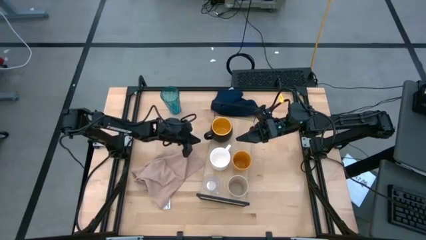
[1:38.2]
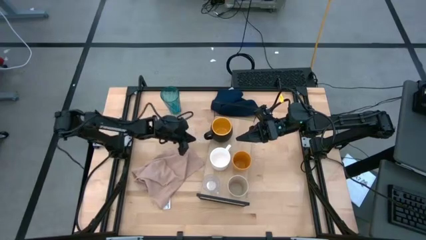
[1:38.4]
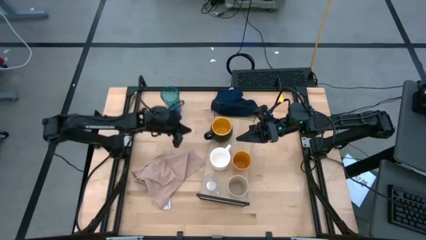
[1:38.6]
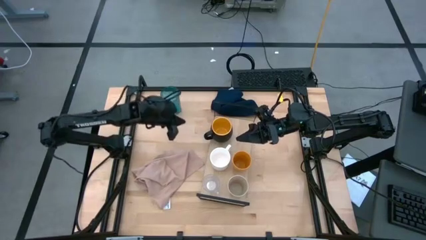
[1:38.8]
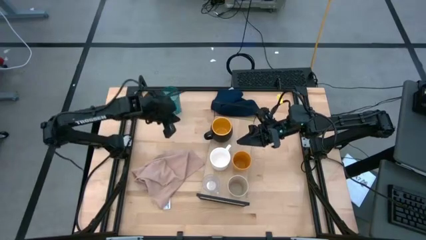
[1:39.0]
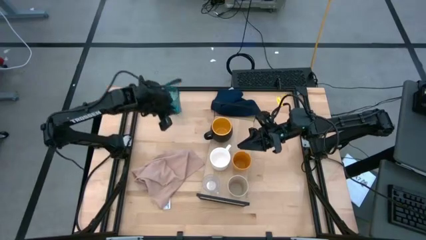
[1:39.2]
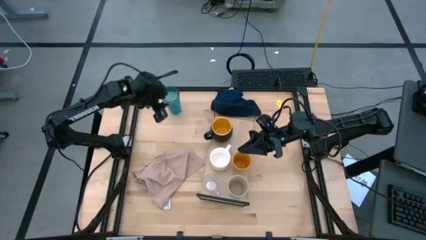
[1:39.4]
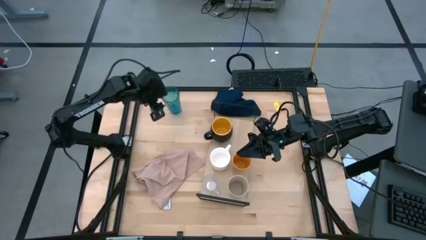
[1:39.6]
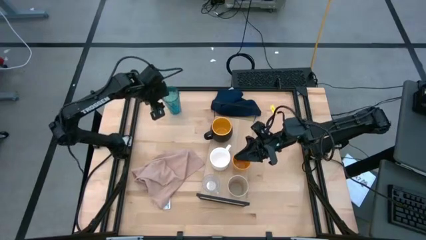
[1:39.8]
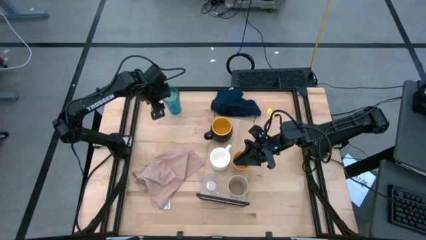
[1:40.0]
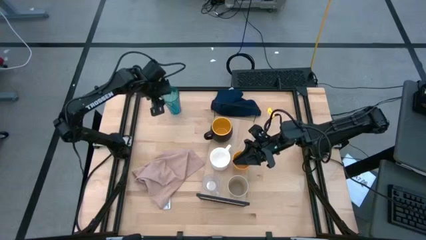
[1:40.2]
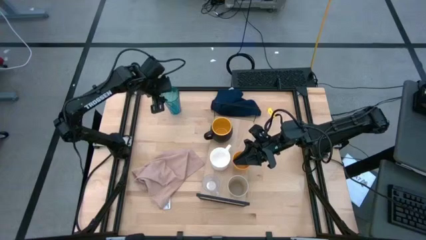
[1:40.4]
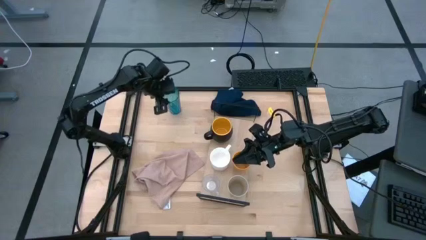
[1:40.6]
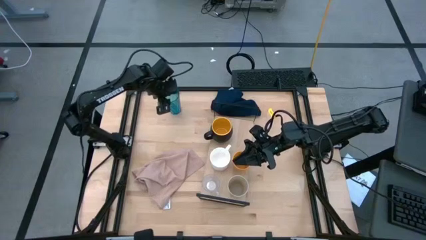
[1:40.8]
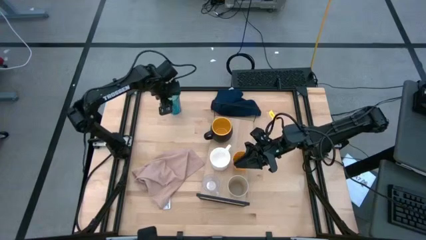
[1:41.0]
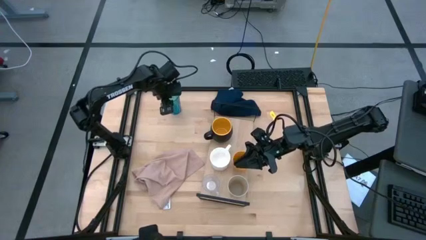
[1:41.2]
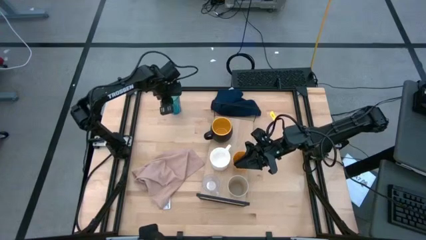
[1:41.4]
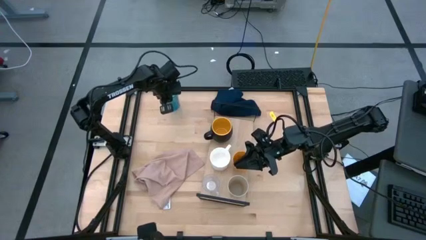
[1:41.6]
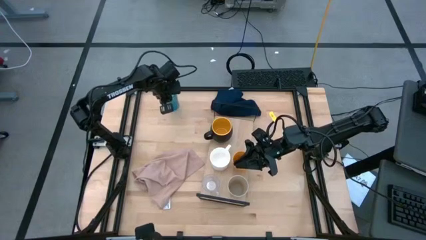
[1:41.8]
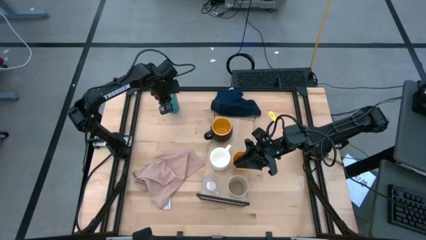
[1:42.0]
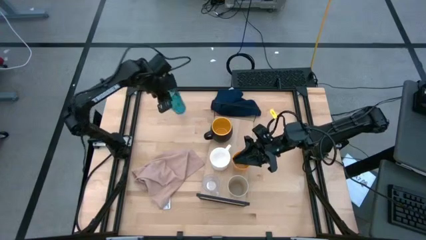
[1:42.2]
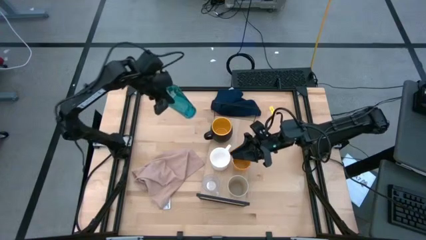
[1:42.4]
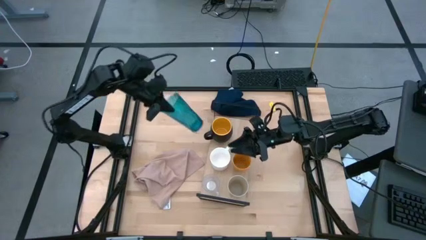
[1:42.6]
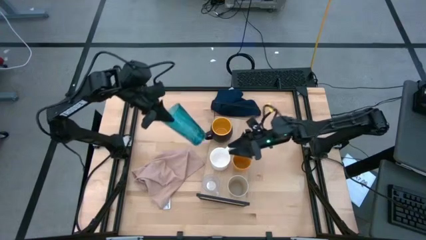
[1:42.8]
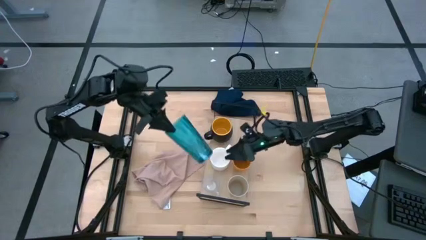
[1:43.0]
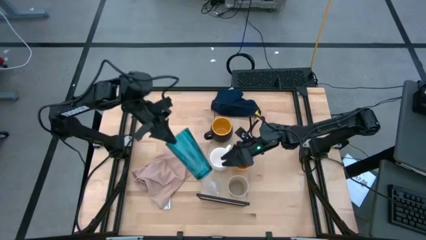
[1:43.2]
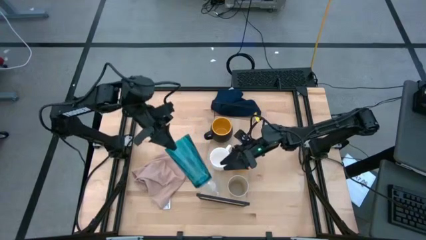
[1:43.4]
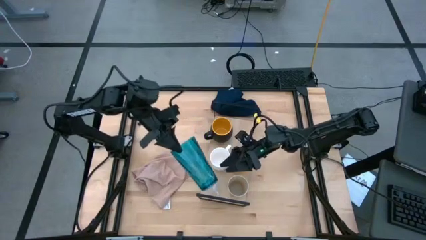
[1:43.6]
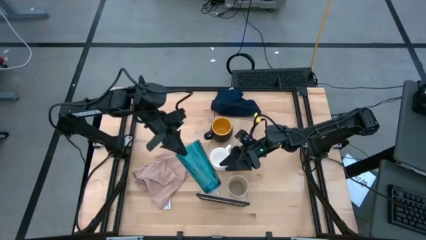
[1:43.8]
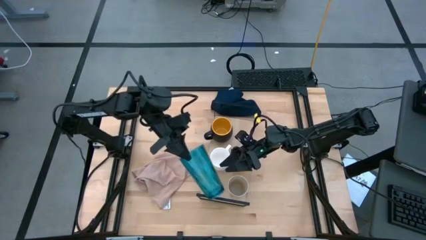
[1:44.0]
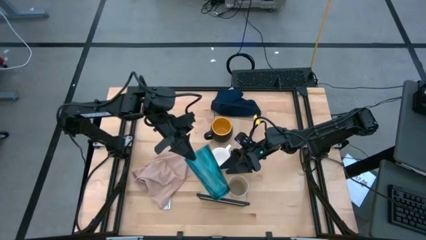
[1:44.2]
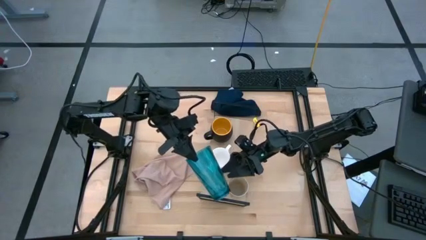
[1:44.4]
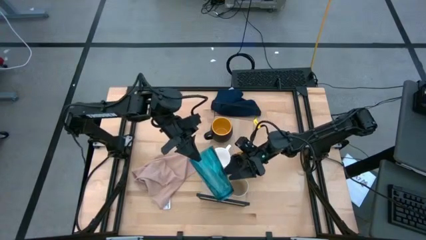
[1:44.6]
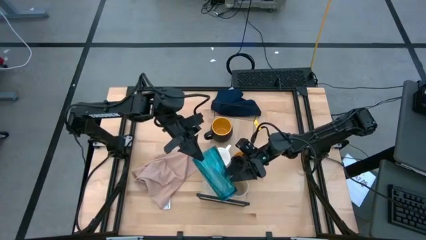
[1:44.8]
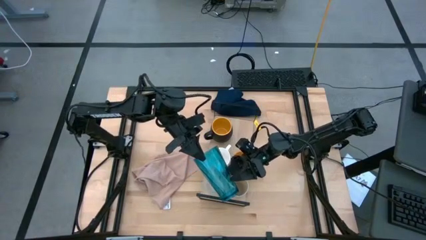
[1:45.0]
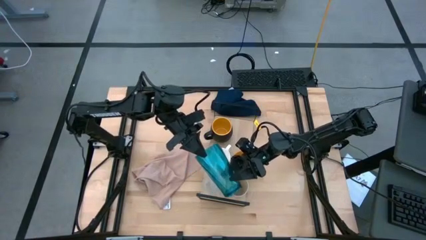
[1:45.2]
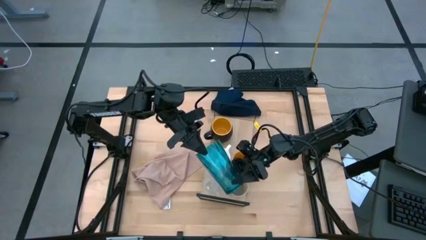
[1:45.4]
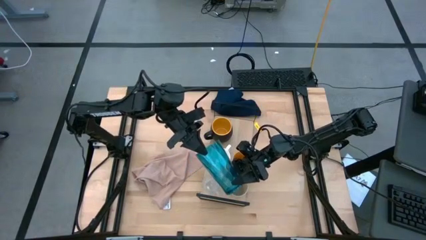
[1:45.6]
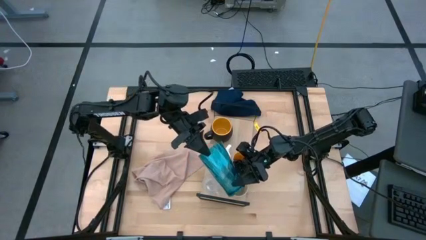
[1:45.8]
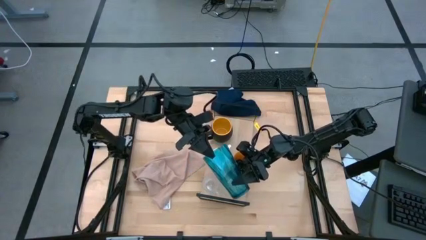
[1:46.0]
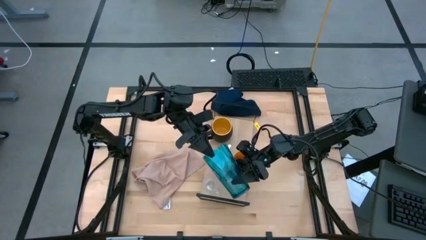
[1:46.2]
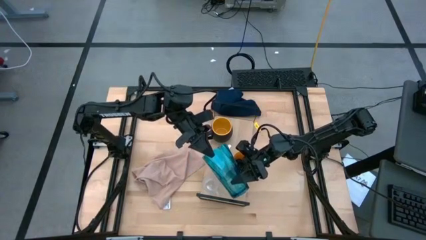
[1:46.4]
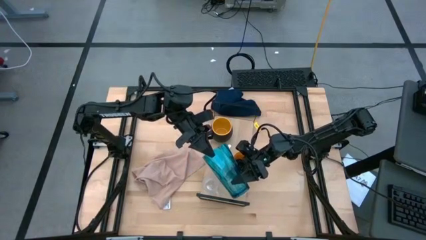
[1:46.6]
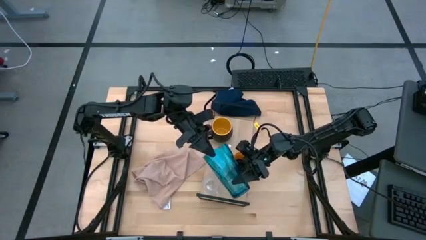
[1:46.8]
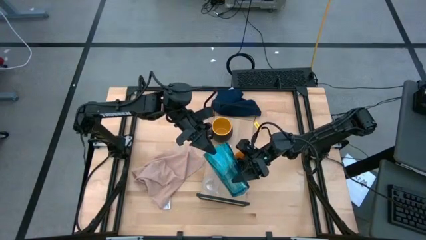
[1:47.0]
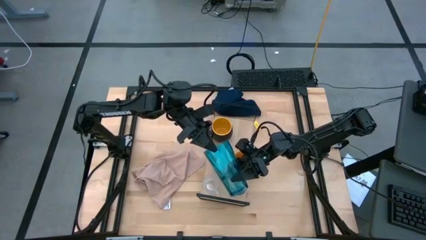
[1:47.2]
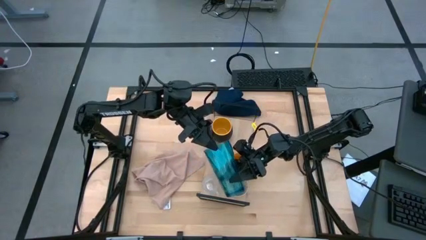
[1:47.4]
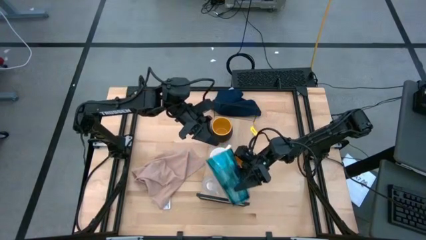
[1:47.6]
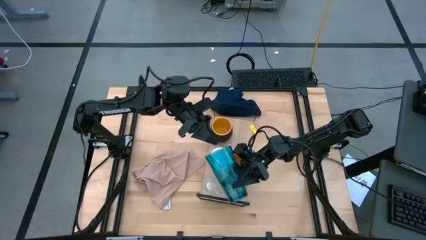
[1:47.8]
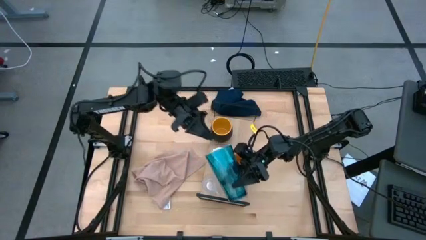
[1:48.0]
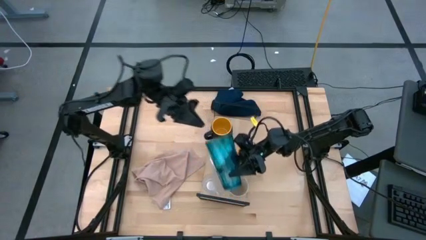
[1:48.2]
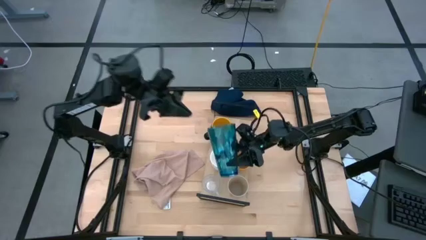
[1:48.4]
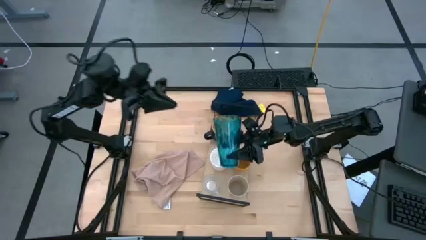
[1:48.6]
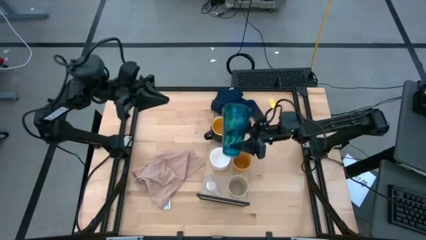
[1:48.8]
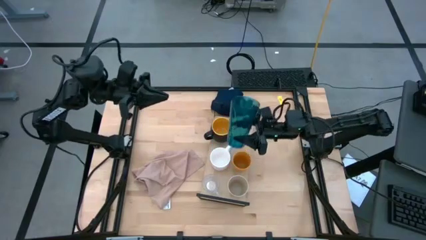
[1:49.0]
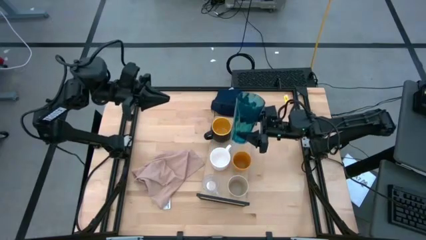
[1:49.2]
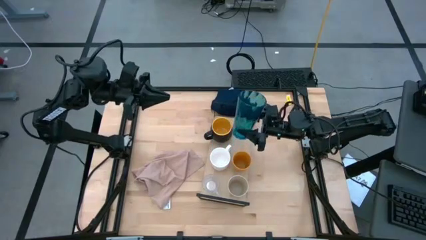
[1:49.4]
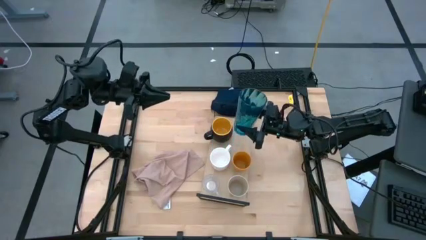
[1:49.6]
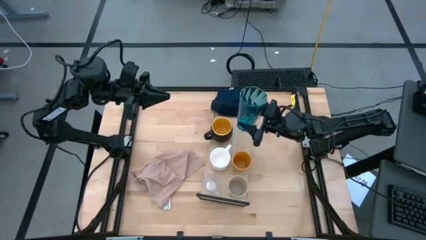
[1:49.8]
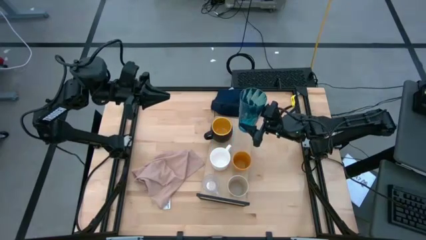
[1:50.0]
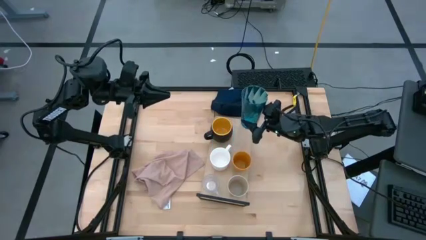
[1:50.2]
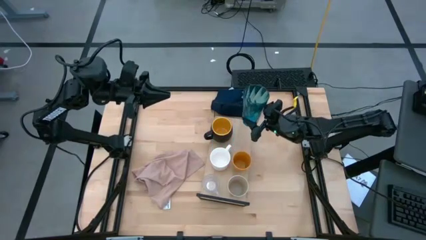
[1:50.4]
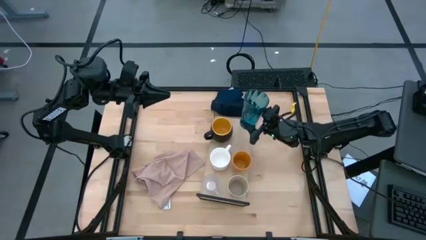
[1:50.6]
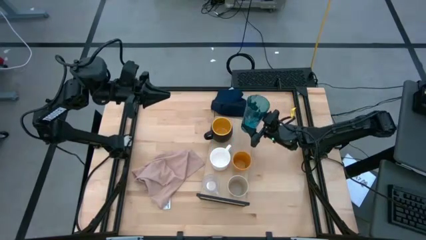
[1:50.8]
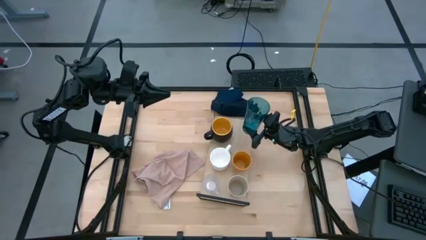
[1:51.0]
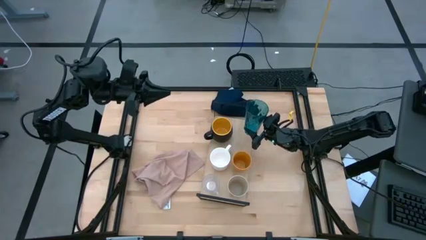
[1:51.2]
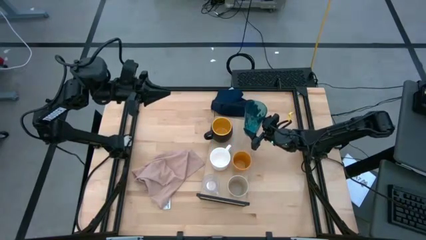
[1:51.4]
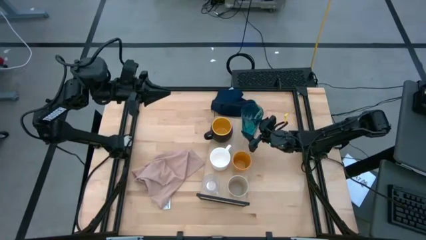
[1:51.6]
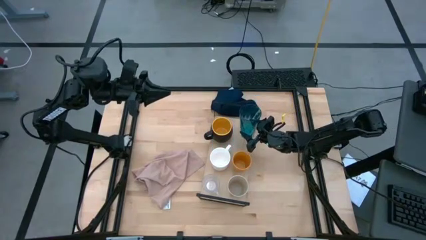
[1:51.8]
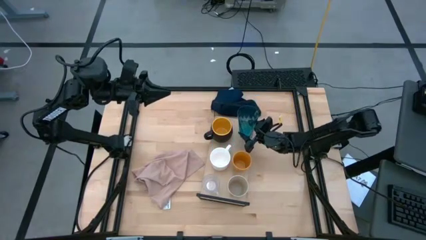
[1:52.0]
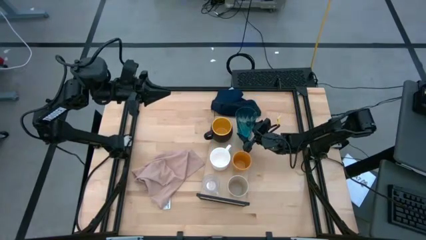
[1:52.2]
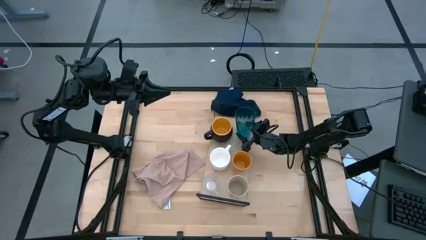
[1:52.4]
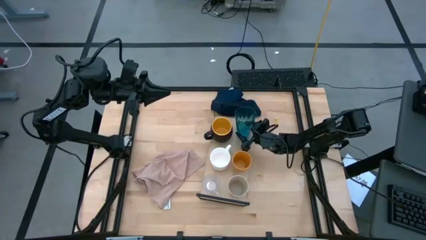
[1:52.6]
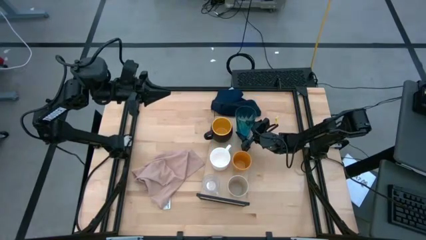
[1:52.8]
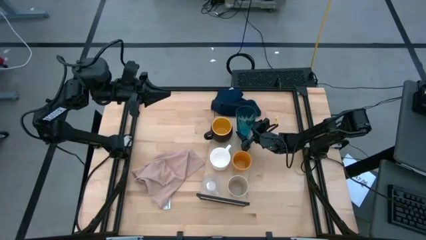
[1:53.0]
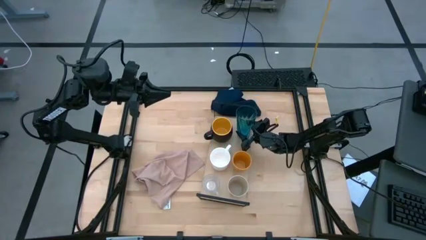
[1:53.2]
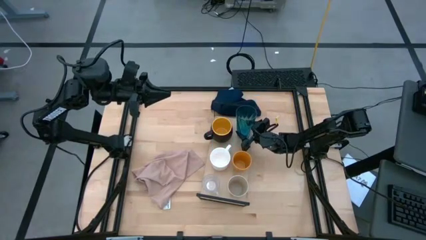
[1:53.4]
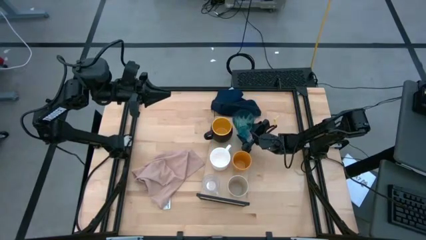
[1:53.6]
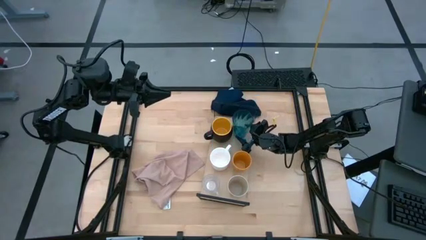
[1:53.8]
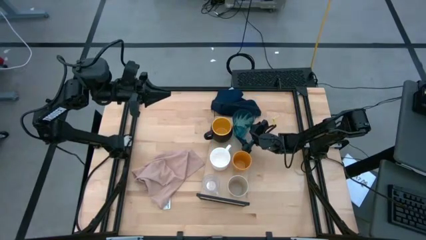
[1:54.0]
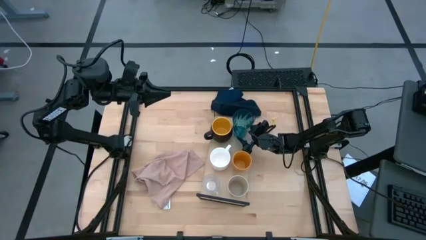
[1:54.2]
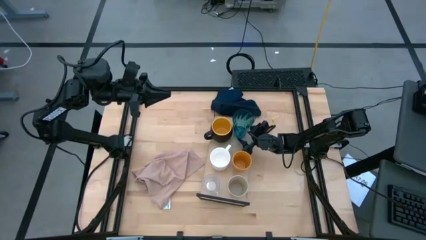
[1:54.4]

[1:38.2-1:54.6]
Task: Stack small to large cups/mugs on shelf
Put the blue cup on the shelf aligned with the yellow cup
